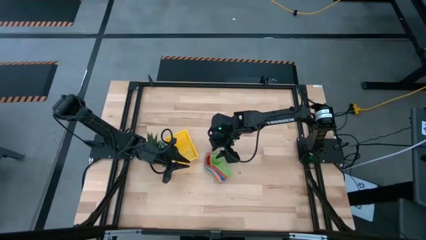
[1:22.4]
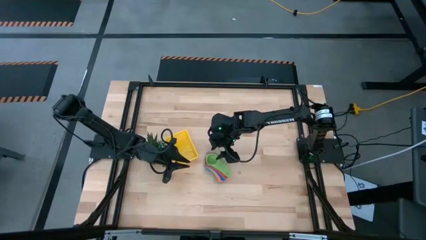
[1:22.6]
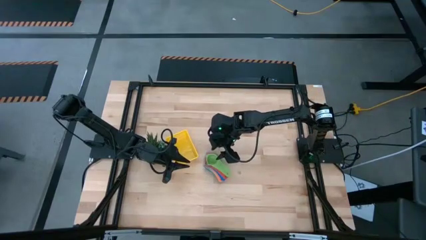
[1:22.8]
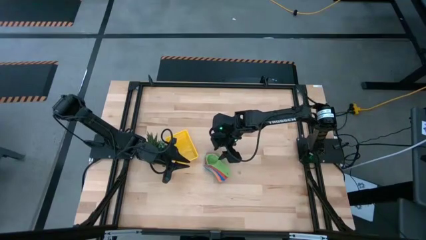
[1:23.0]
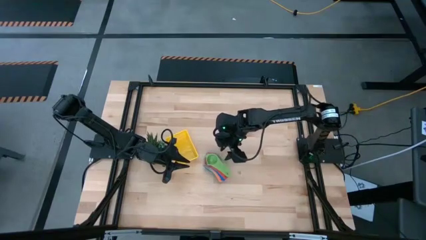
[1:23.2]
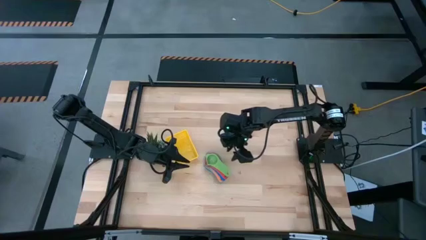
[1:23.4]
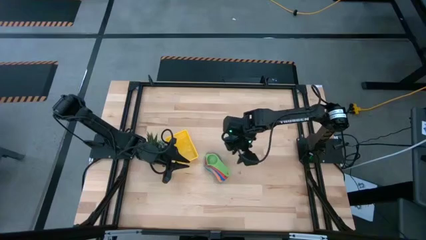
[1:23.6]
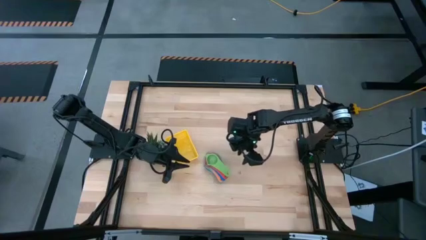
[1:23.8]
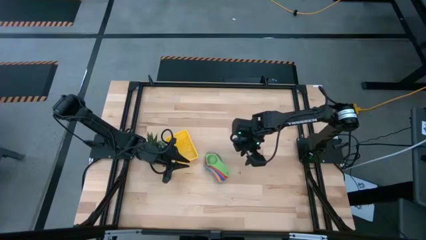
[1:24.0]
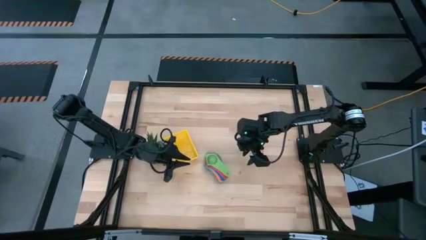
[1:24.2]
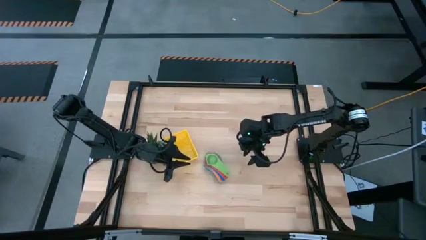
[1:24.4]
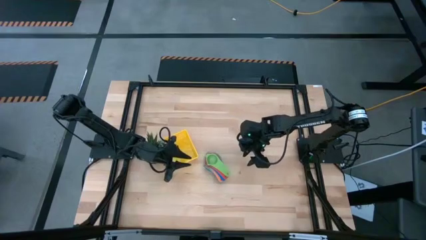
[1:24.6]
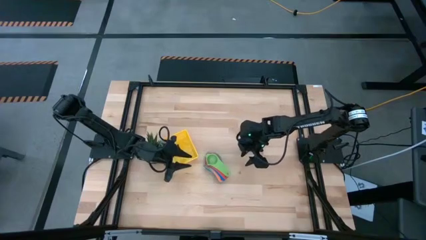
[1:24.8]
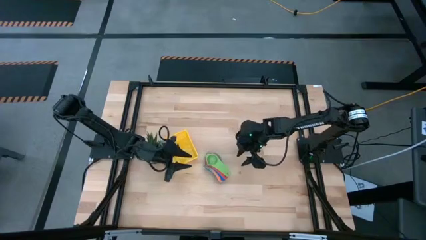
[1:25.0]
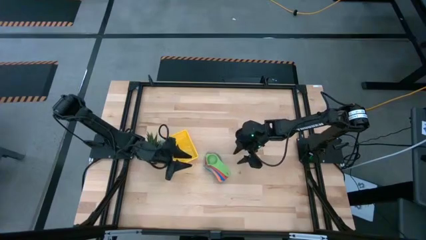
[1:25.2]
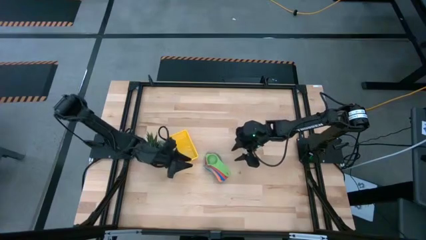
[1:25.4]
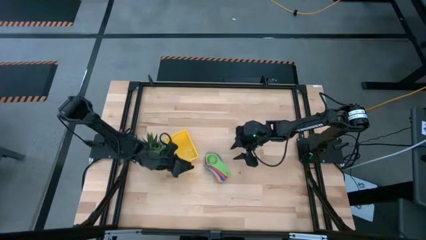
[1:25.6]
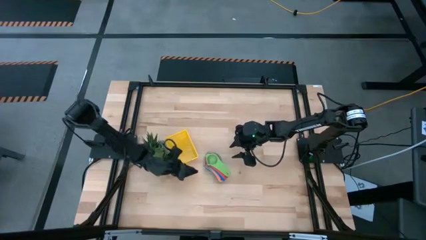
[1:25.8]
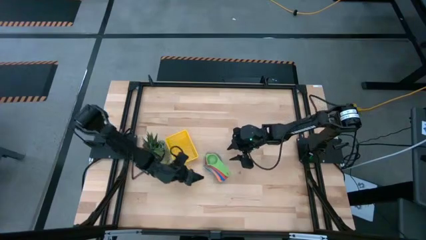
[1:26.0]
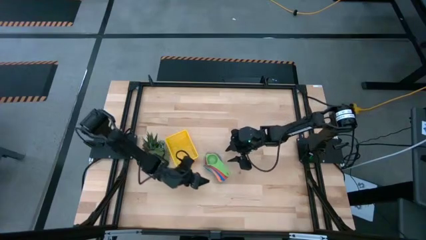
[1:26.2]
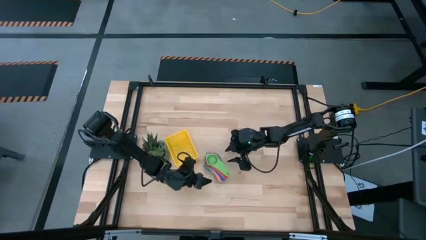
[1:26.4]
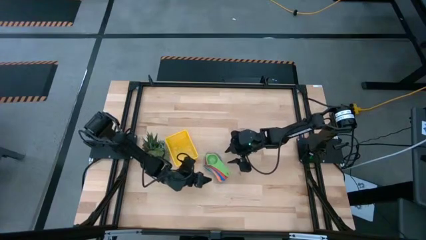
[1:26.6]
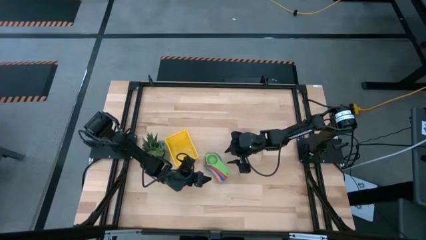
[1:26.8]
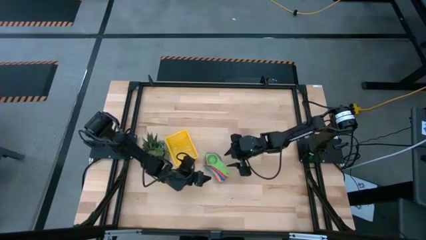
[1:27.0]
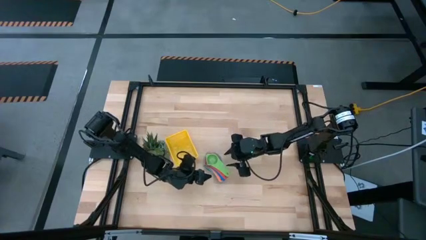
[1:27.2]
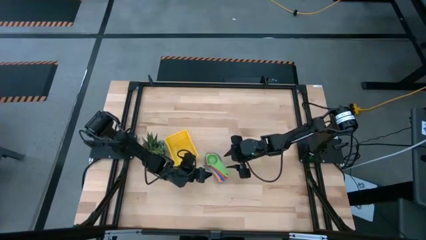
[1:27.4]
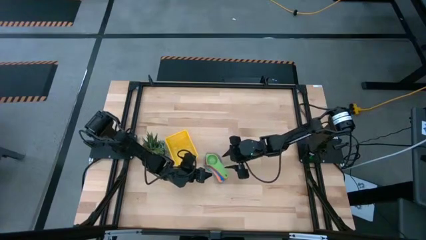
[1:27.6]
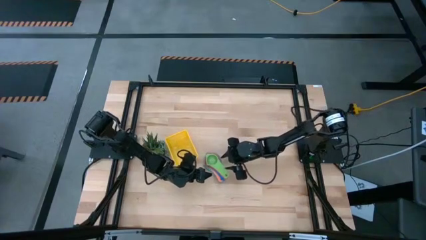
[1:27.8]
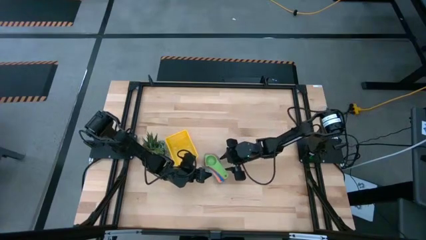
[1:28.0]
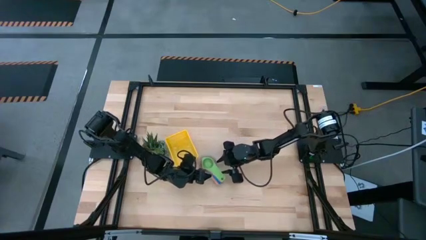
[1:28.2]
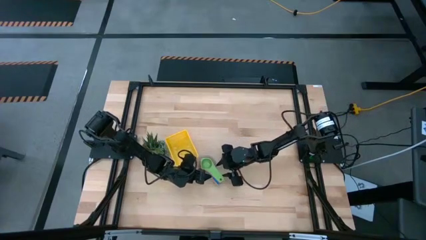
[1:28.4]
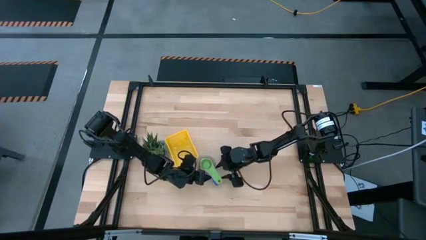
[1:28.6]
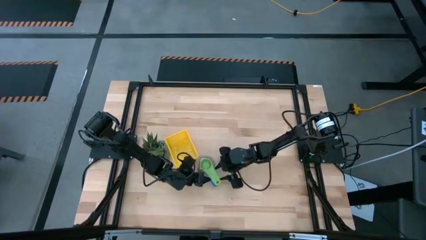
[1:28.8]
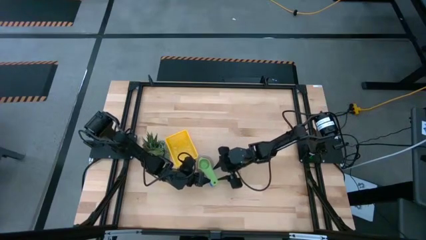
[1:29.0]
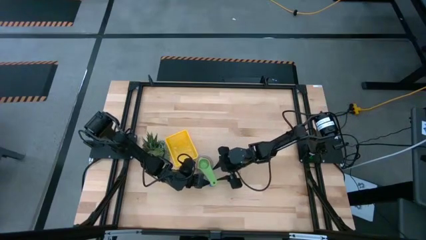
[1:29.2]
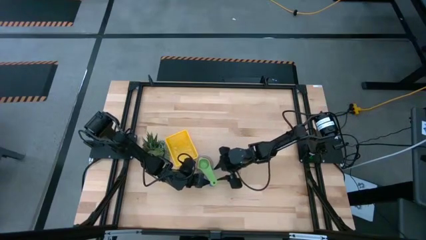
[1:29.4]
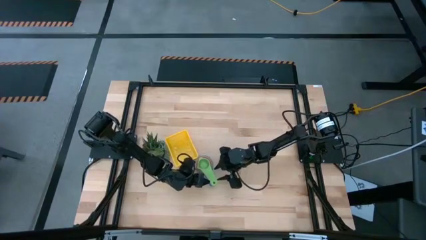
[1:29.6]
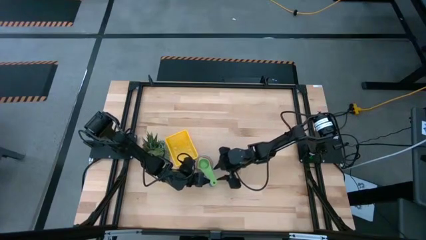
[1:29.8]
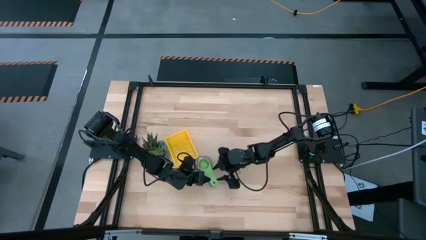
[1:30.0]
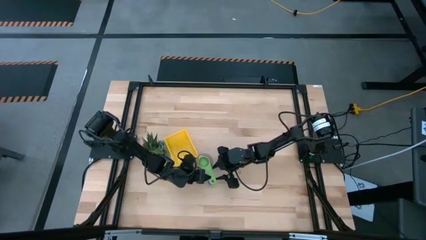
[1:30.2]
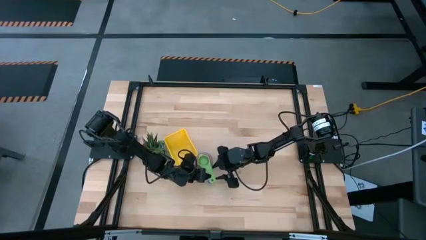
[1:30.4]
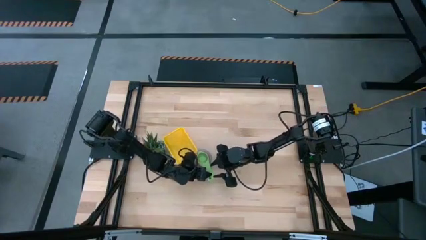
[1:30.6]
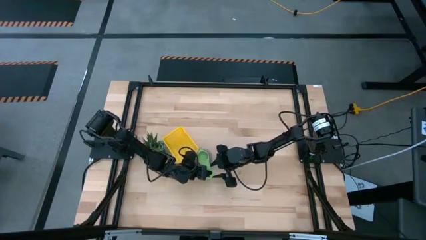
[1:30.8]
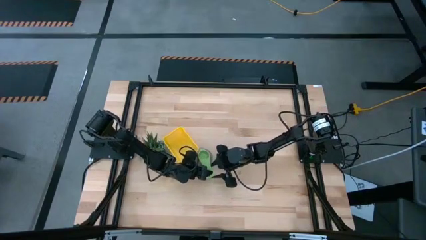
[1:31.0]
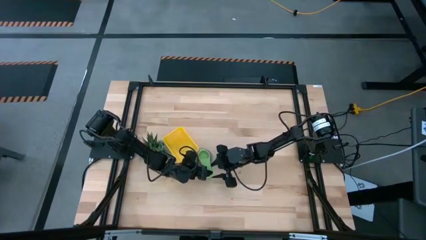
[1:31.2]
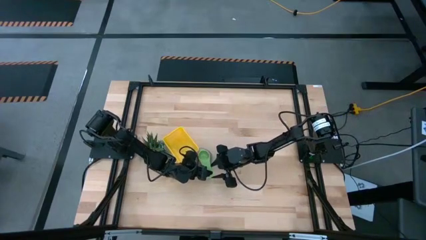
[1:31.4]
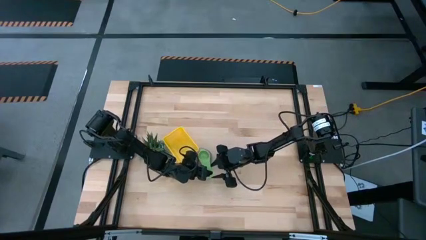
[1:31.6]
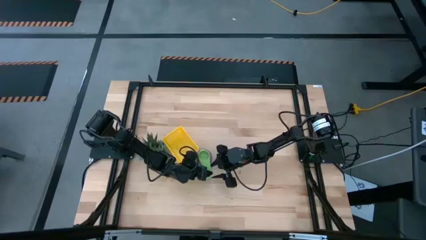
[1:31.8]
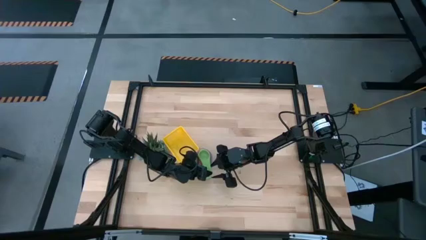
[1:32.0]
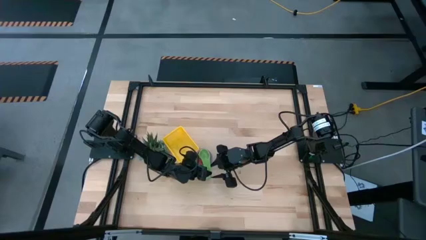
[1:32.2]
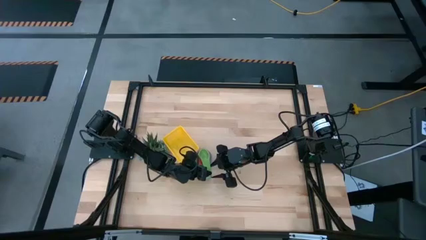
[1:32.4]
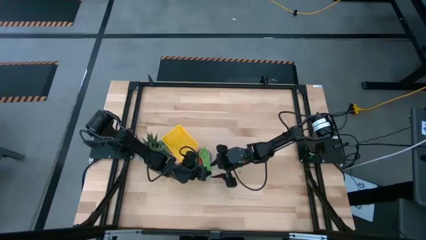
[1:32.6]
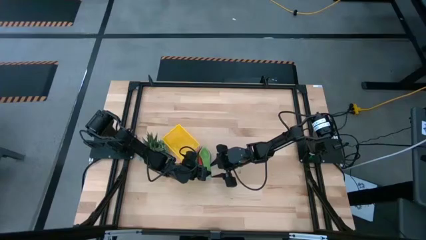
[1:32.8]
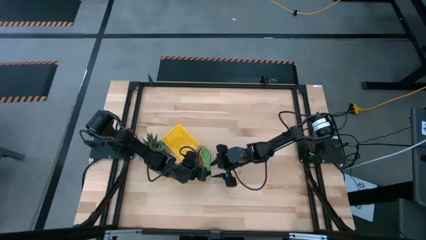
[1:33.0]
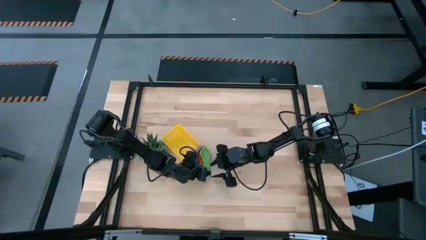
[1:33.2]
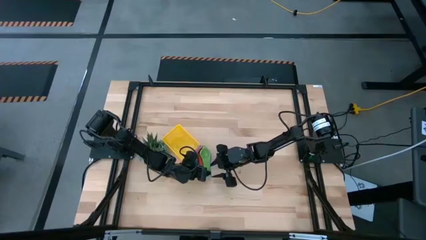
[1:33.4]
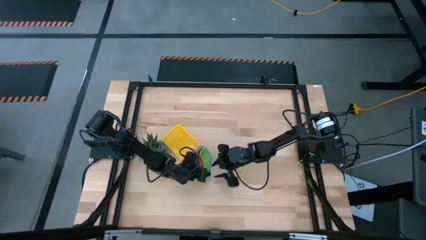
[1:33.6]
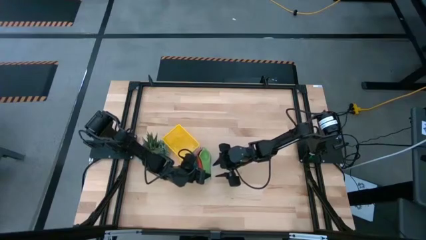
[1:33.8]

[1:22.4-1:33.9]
Task: Nest measuring cups in basket
Put the stacked measuring cups into the yellow bin

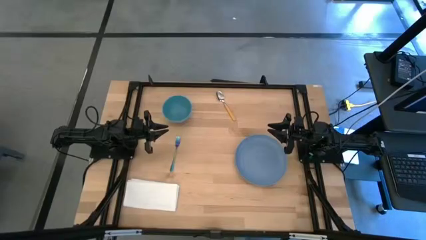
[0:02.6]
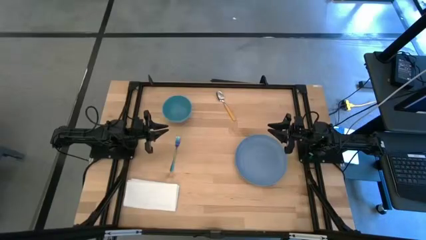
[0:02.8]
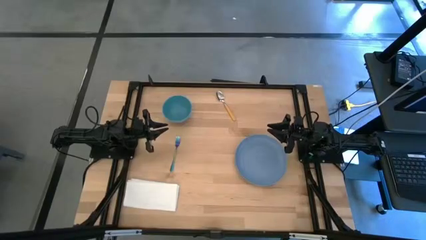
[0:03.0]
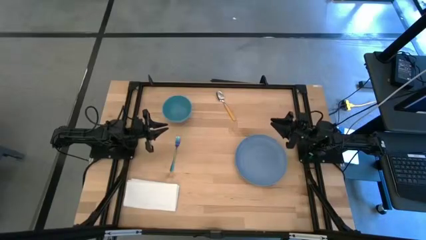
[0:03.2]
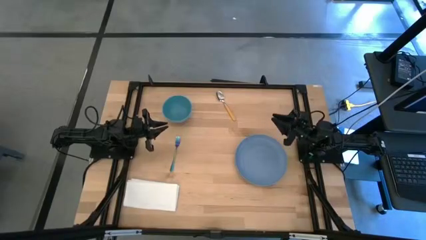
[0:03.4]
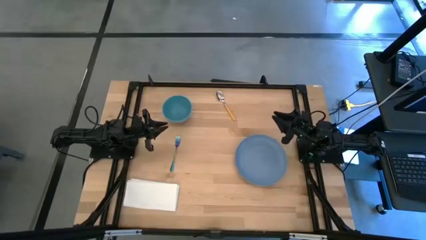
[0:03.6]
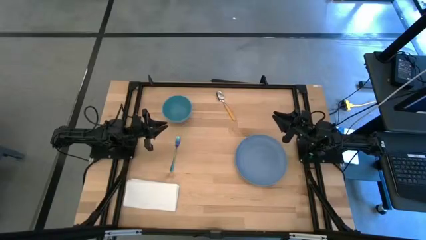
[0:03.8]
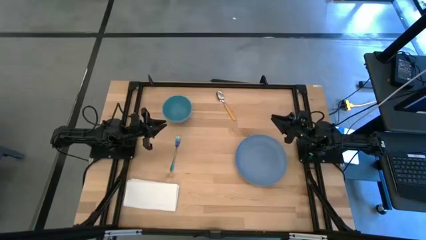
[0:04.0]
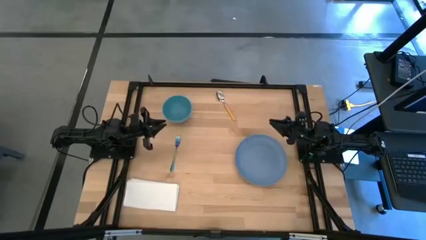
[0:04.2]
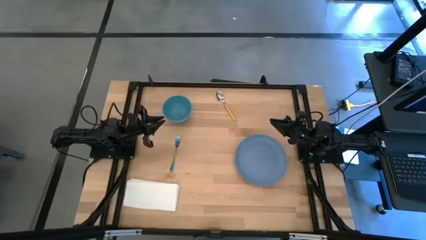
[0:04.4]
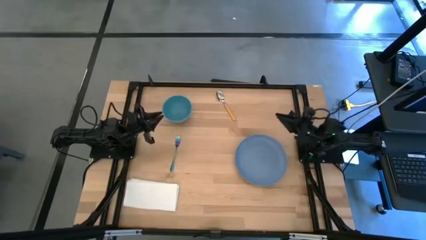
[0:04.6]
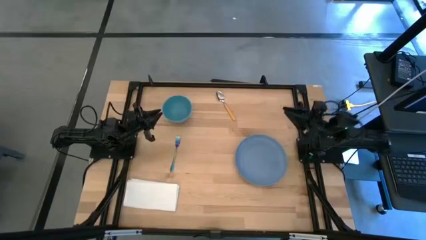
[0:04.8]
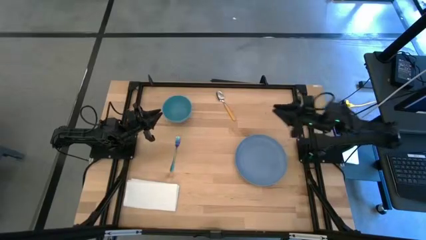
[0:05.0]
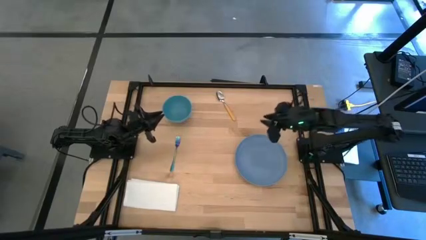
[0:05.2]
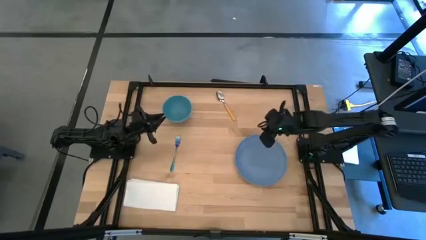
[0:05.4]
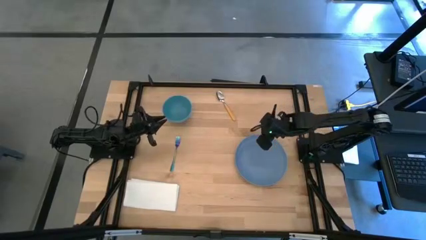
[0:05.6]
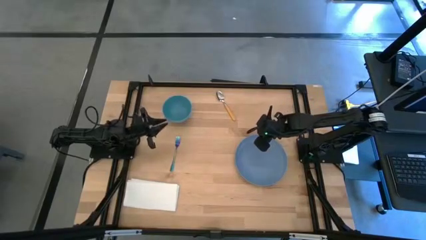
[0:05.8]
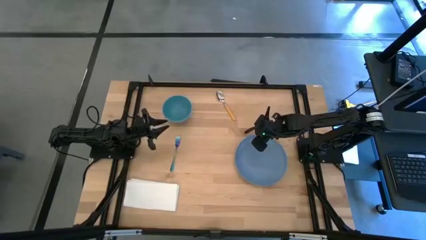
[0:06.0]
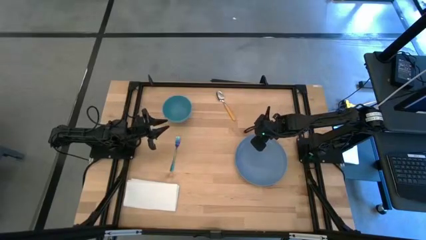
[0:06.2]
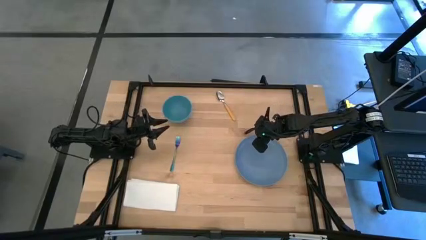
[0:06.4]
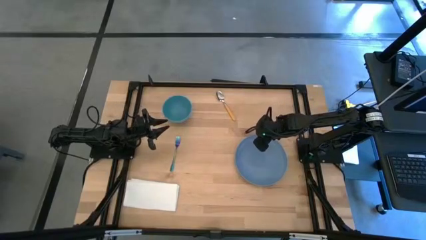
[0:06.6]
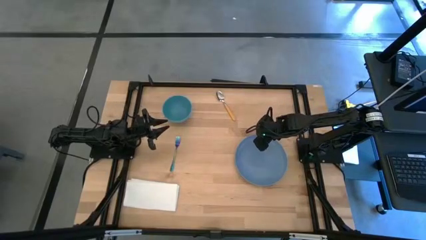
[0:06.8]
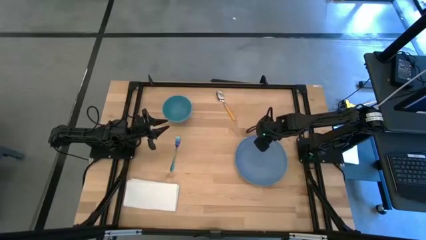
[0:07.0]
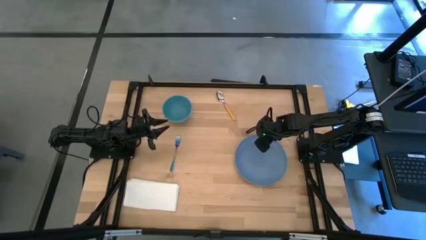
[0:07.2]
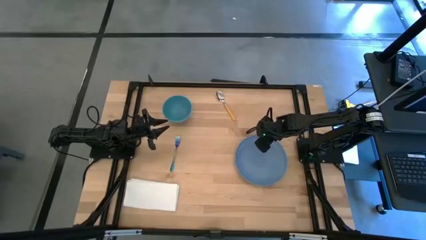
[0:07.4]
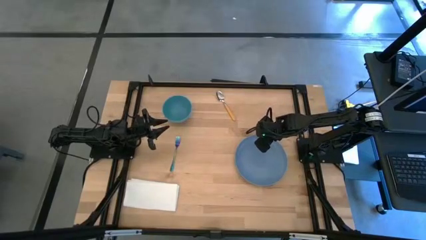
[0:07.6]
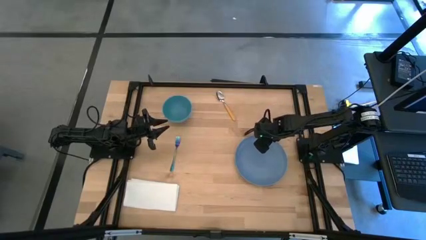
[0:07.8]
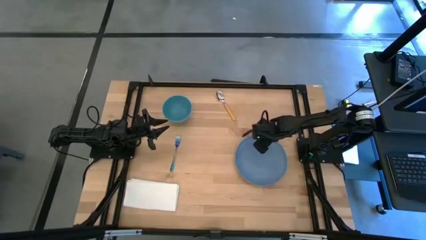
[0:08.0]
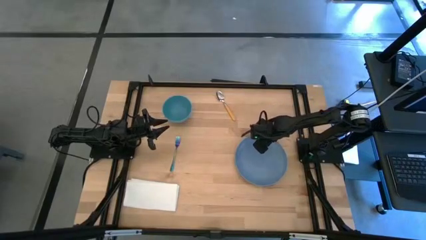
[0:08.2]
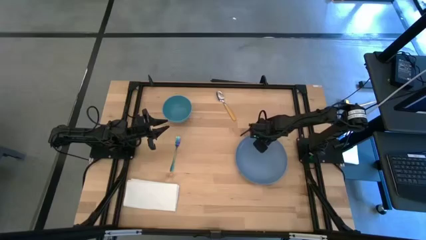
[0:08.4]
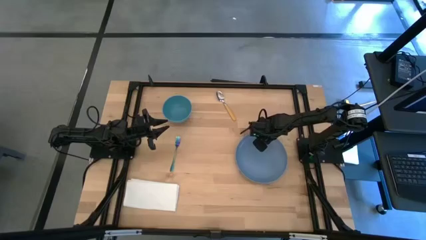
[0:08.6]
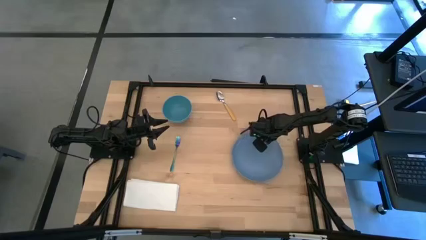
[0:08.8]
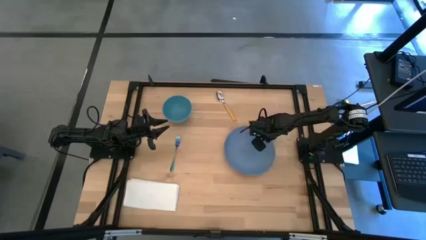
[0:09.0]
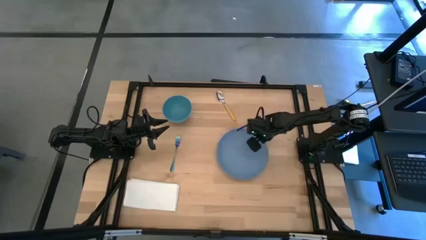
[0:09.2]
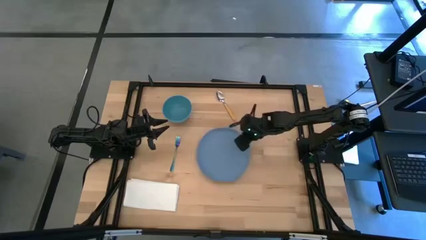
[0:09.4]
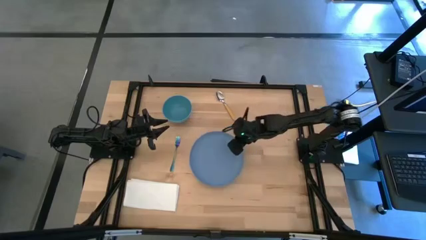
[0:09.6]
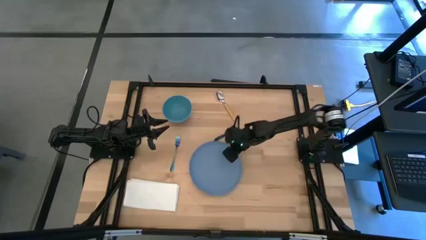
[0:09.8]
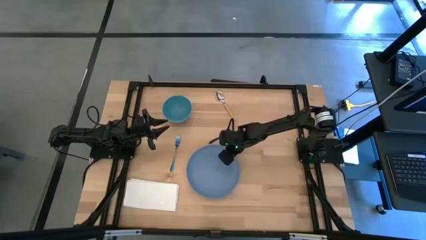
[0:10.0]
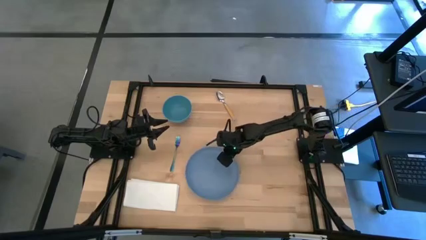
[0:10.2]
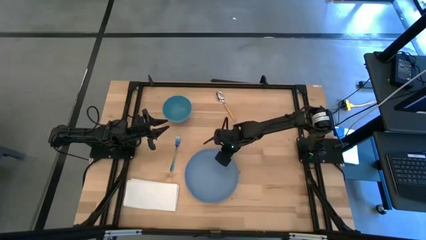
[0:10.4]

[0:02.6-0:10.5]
Task: Set table place
Move the plate to the center of the table
